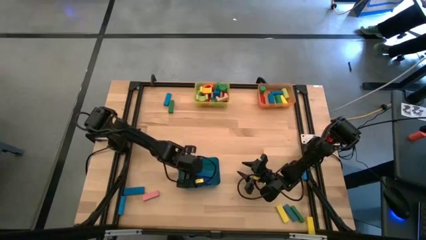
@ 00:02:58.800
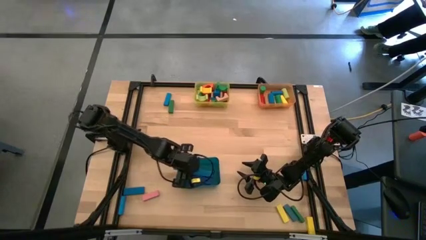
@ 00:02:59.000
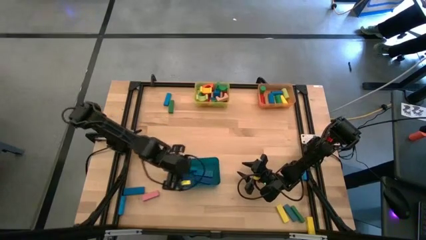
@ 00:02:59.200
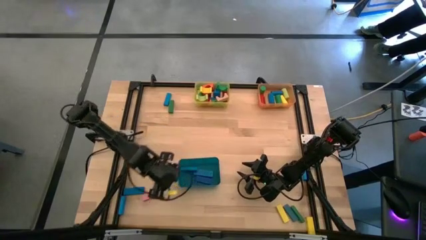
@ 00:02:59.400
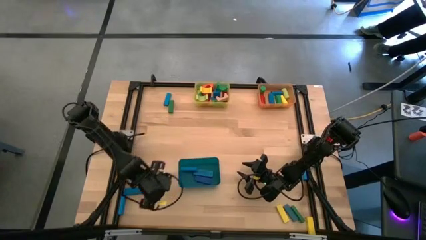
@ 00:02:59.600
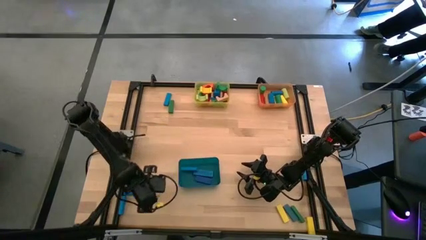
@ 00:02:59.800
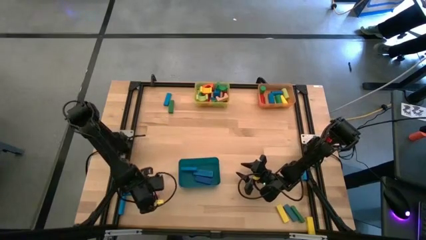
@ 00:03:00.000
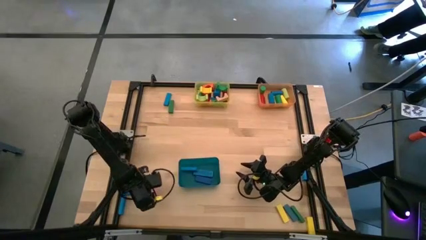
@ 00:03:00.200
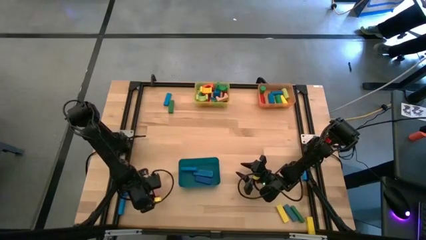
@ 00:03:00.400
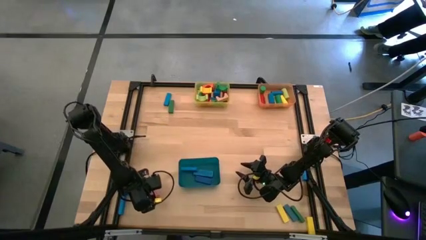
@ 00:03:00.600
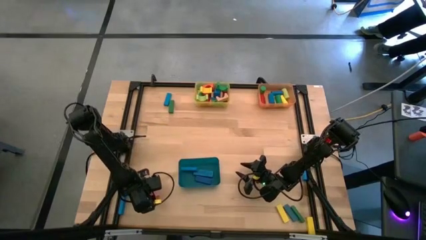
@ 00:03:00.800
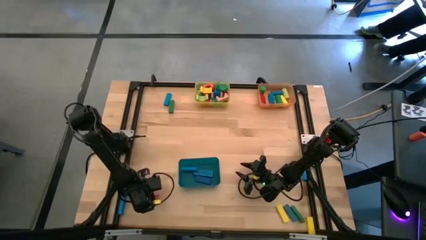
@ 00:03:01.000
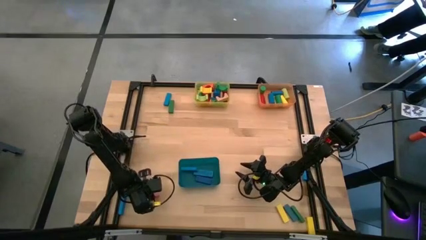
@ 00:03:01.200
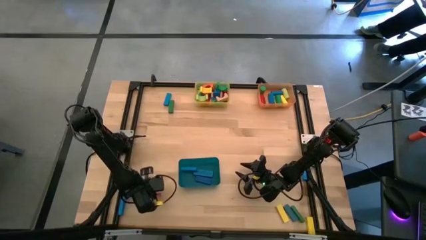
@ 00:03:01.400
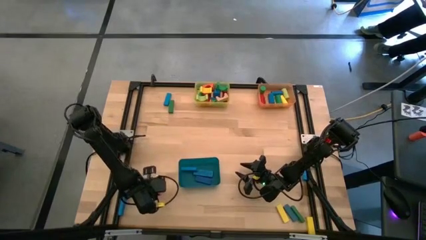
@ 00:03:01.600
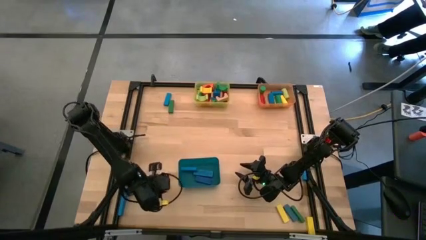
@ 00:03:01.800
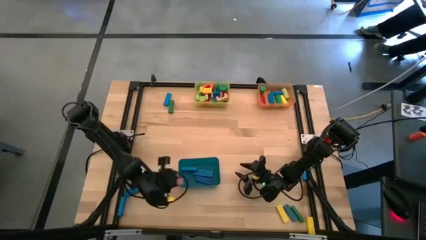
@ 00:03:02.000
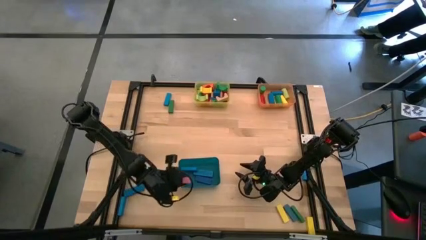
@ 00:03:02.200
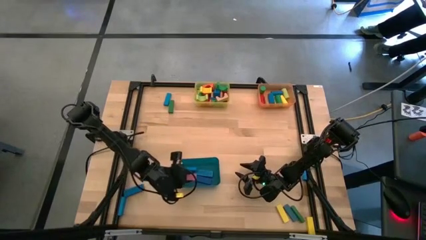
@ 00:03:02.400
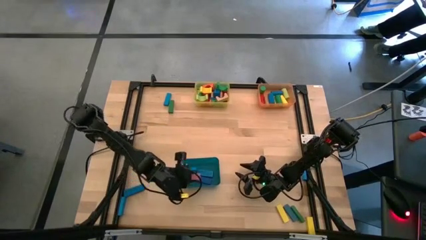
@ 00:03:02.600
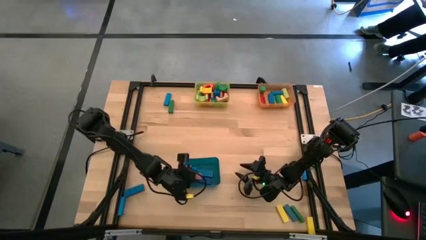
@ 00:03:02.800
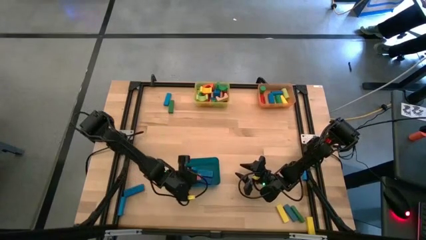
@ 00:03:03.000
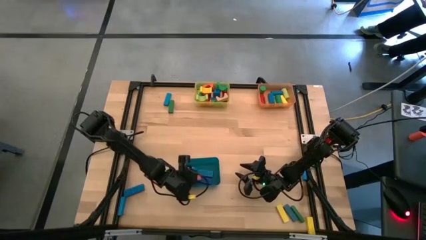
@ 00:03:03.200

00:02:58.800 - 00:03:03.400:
Task: Sort blocks by size
Put the pink rectangular block into the blue bin

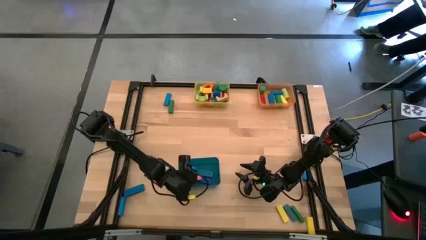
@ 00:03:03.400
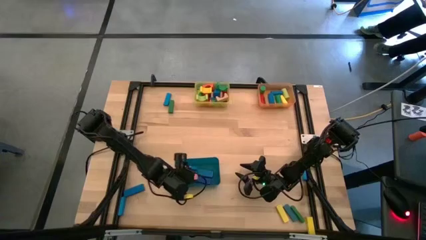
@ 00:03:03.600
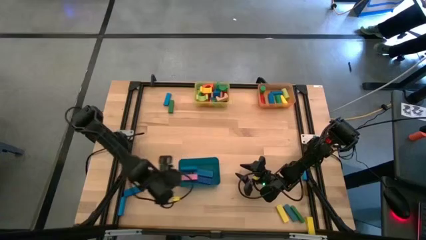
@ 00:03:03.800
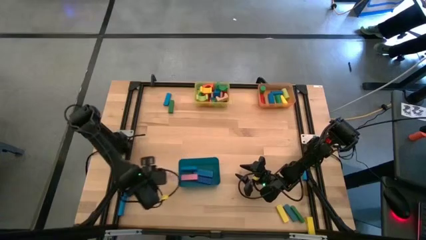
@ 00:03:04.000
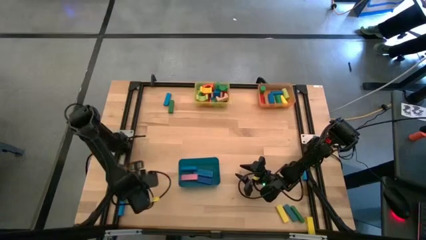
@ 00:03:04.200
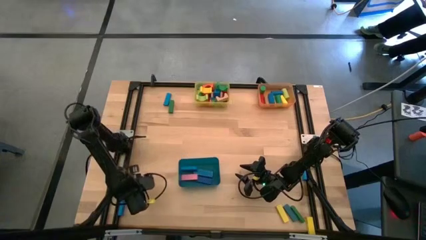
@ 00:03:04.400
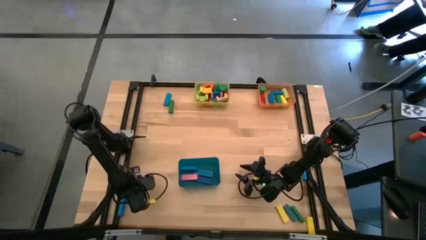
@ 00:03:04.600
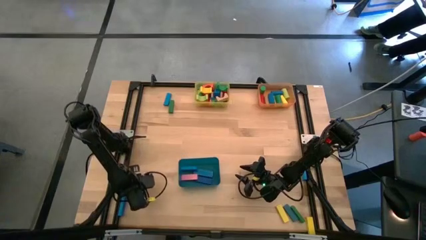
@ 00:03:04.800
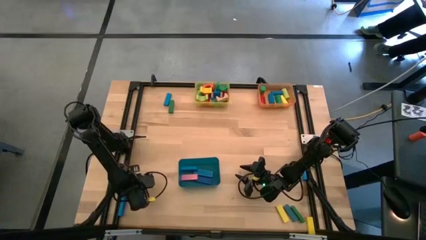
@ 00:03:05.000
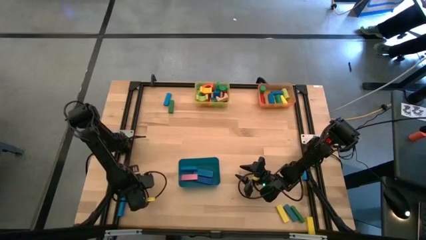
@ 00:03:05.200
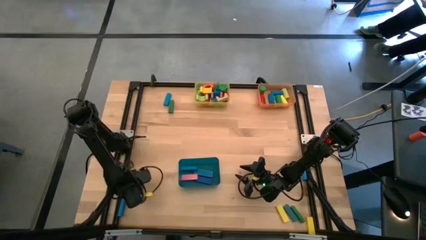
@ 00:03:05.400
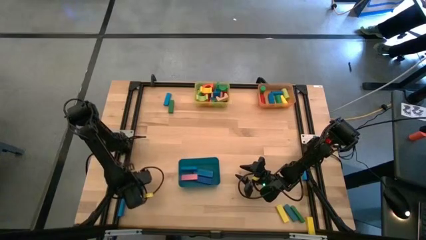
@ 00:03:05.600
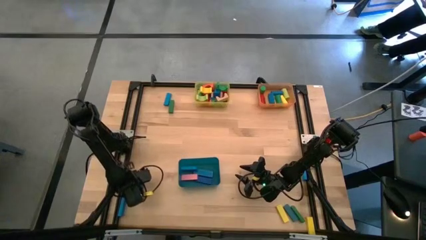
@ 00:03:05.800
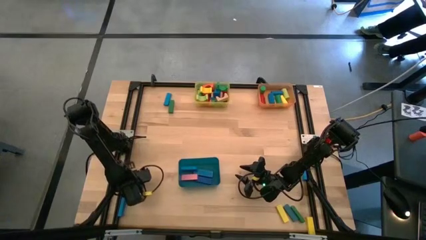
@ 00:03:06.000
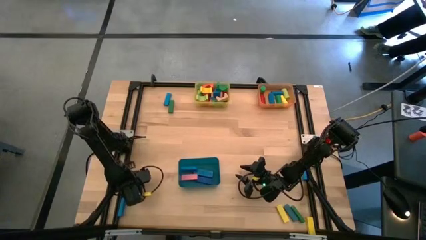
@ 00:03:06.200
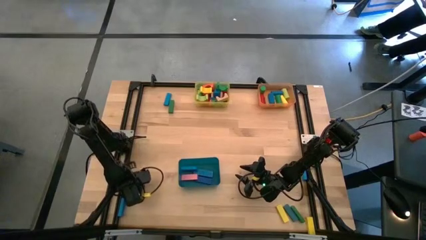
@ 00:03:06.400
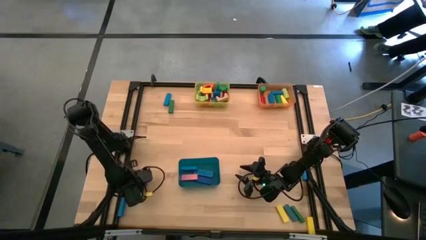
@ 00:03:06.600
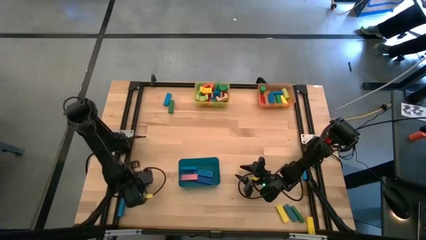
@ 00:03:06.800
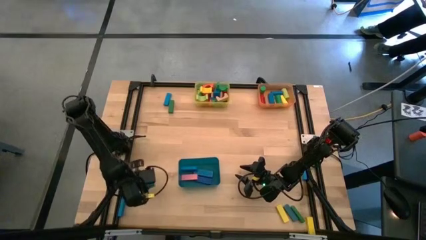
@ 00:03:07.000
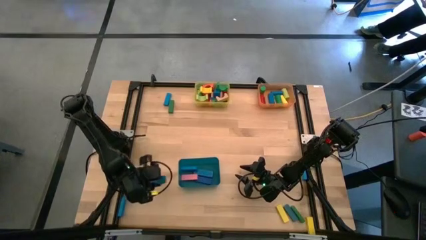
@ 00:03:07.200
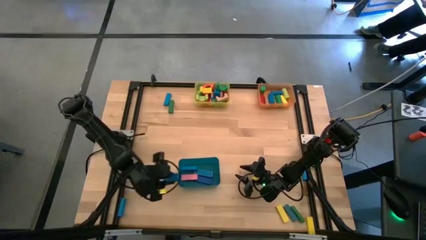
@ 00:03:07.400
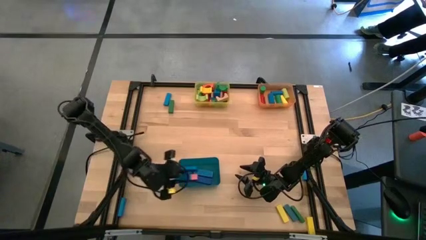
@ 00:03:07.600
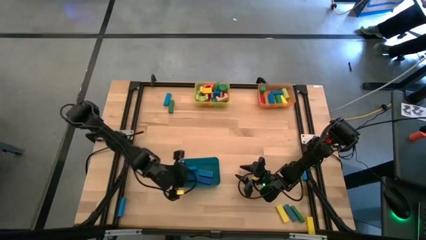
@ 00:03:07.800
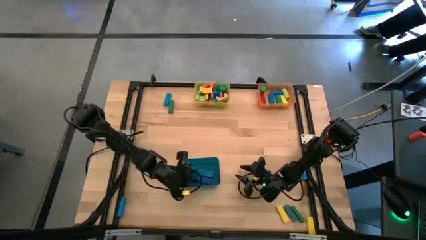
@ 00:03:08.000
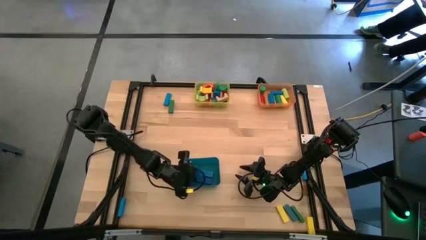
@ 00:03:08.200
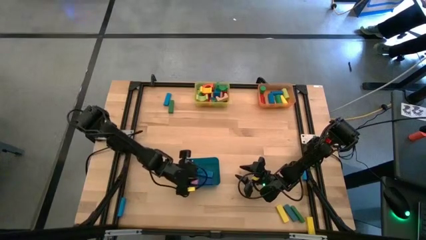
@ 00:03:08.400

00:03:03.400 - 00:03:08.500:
Put the blue rectangular block into the blue bin

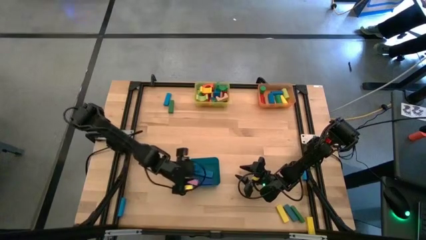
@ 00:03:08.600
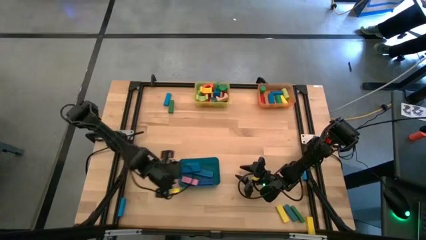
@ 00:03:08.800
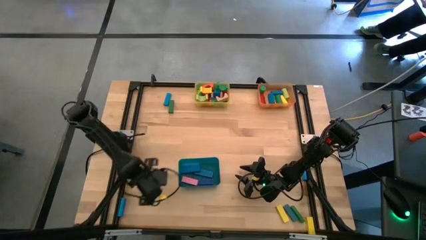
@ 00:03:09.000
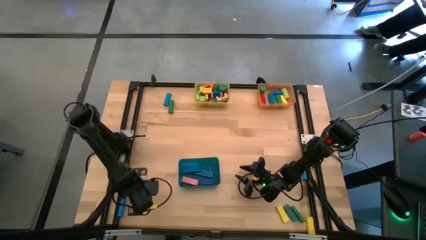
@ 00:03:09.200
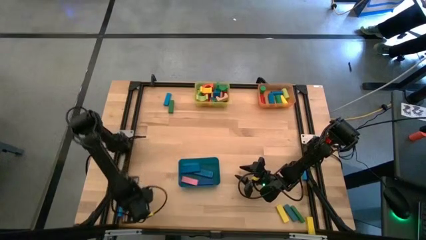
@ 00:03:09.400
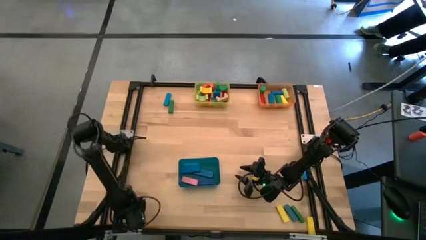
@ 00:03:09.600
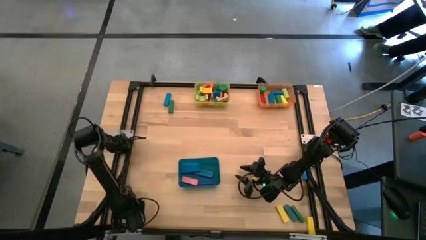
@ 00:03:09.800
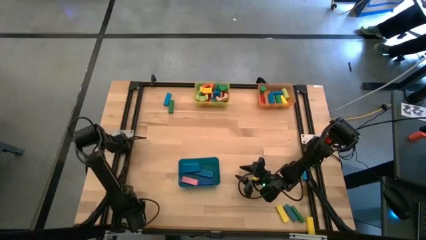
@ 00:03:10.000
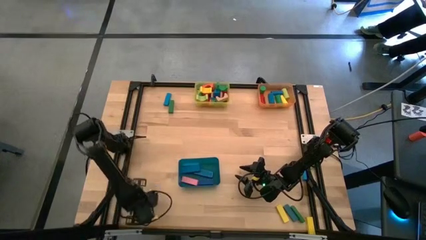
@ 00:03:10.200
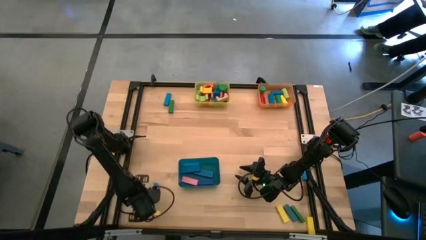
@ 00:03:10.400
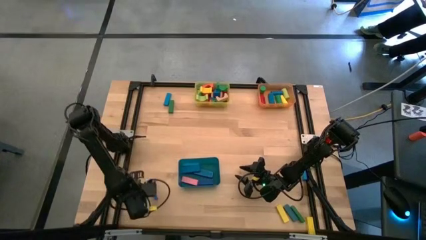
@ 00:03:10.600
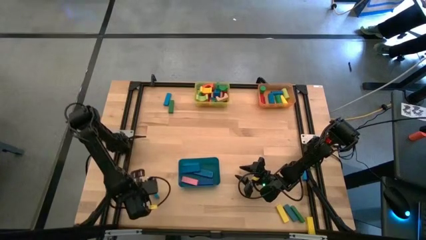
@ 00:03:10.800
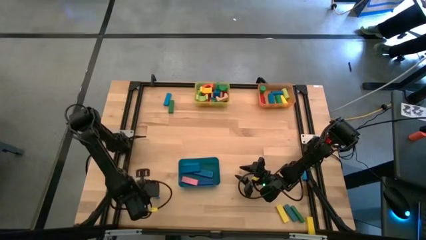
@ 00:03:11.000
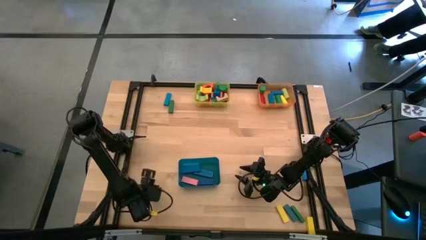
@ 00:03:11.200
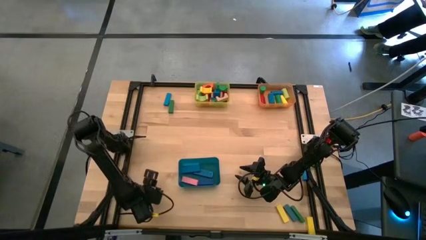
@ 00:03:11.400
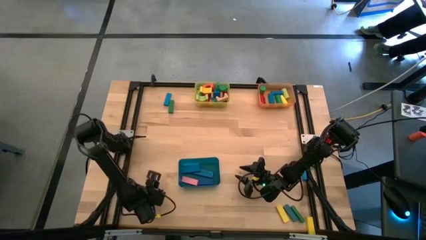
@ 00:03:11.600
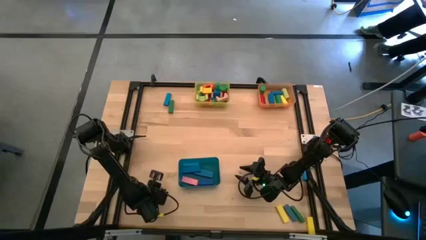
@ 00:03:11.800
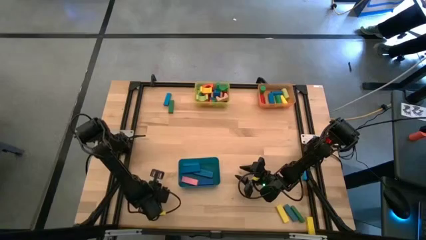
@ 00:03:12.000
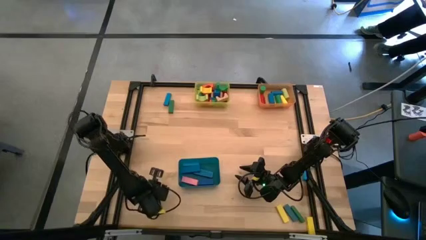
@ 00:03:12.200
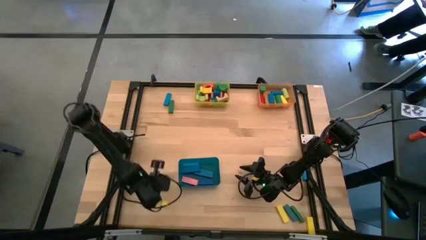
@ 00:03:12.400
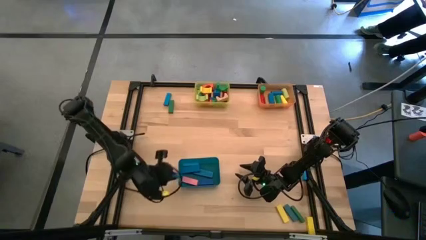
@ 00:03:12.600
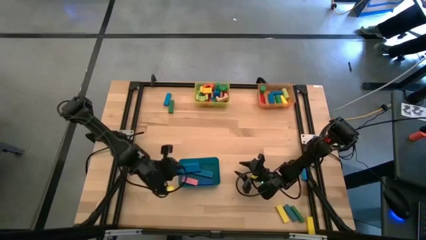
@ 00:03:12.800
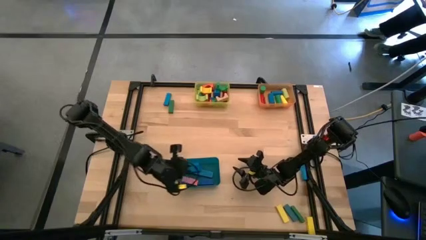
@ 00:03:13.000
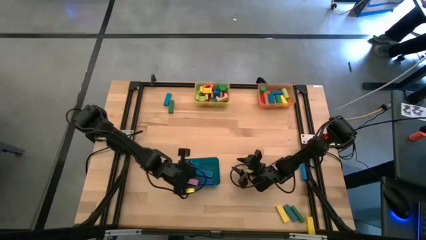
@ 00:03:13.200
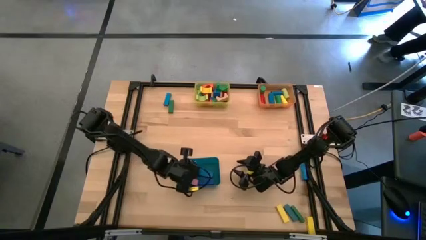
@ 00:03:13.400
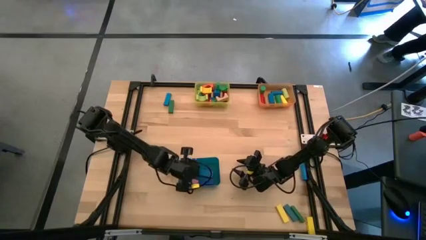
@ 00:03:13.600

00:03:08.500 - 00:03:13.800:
Put the blue rectangular block into the blue bin
